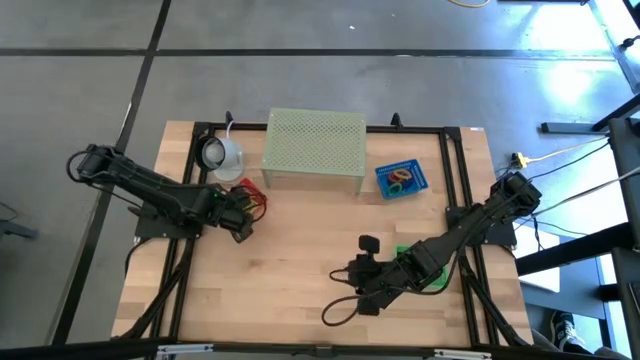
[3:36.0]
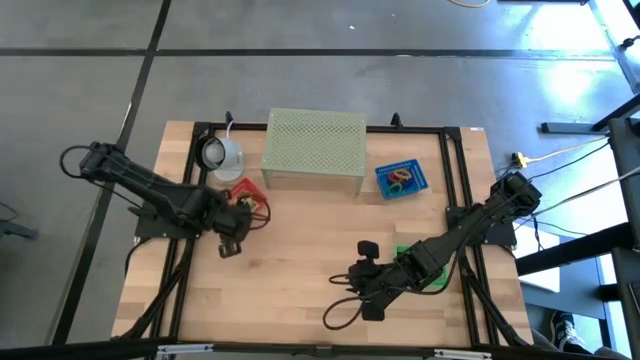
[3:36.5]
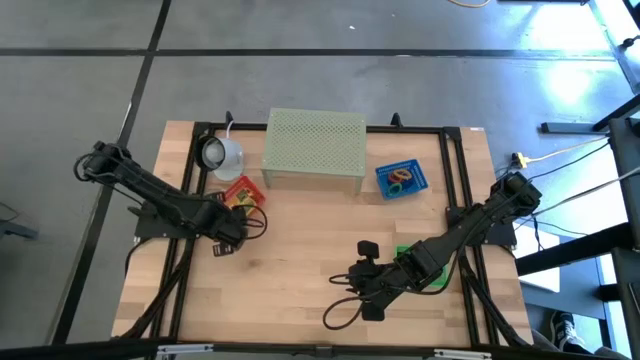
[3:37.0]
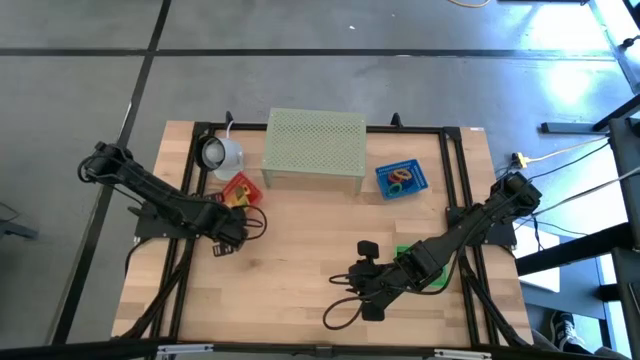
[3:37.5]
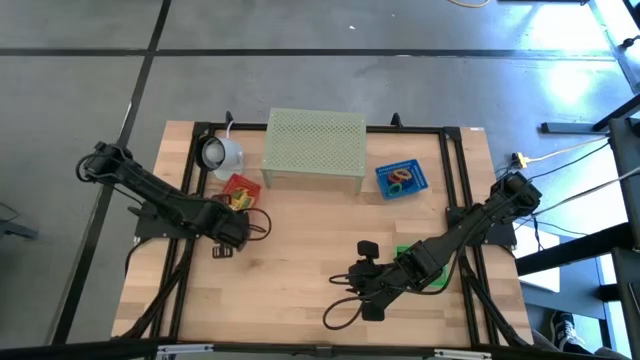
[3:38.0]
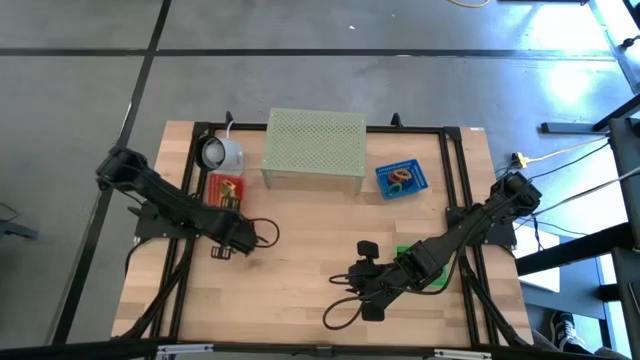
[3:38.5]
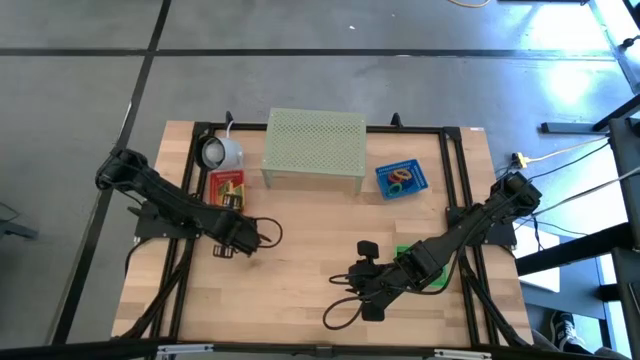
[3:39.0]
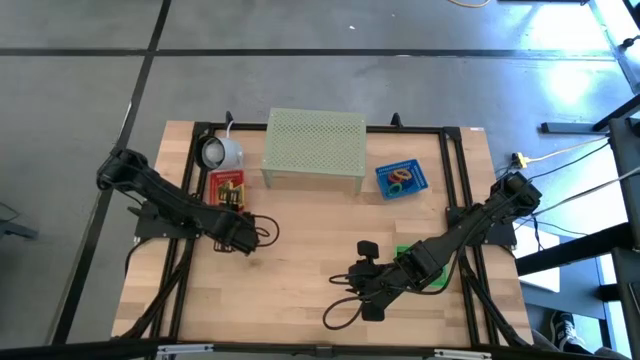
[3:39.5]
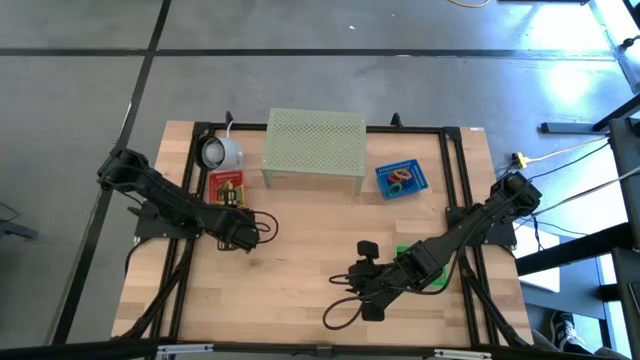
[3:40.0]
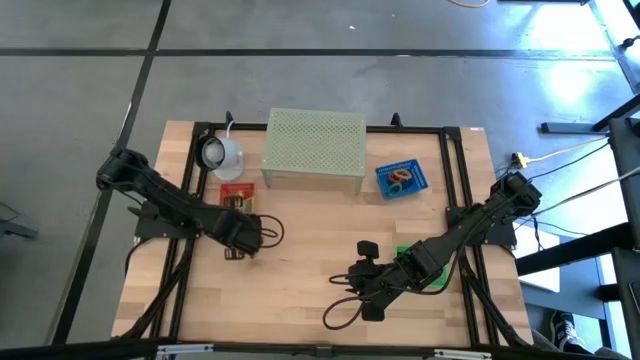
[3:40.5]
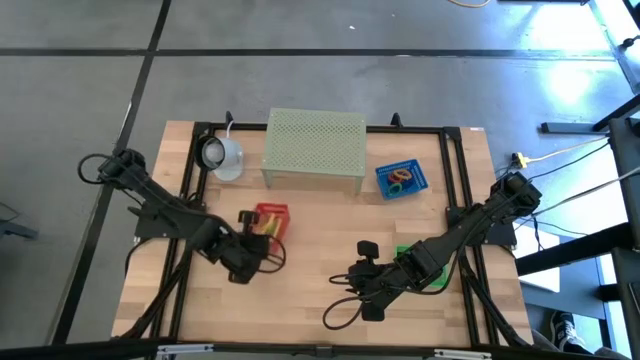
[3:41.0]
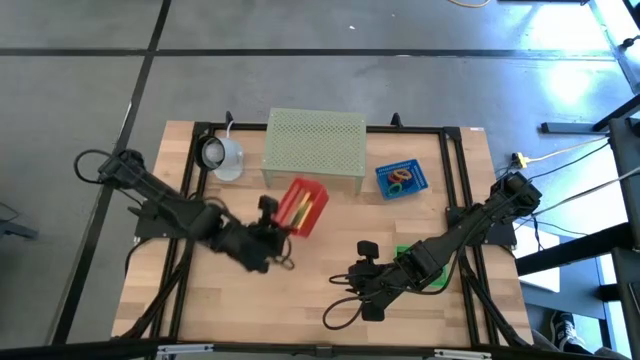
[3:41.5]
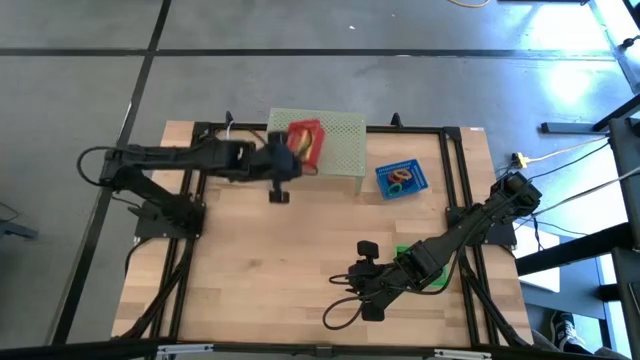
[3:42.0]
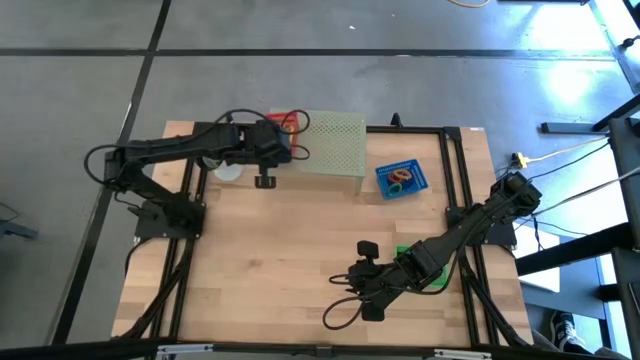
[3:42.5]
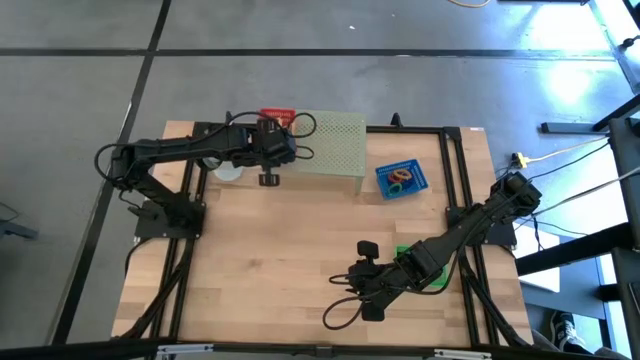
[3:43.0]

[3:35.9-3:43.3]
Task: Pick & Place Office Desk Supplies
Put the red bin on the shelf

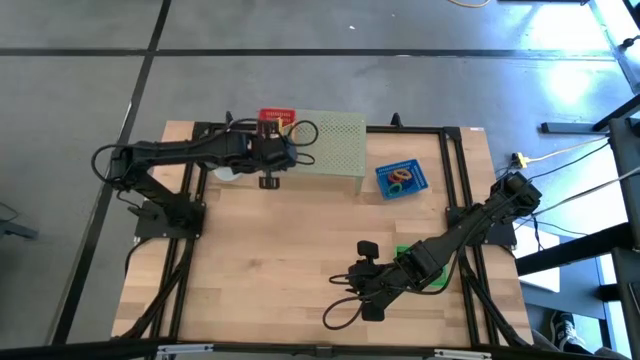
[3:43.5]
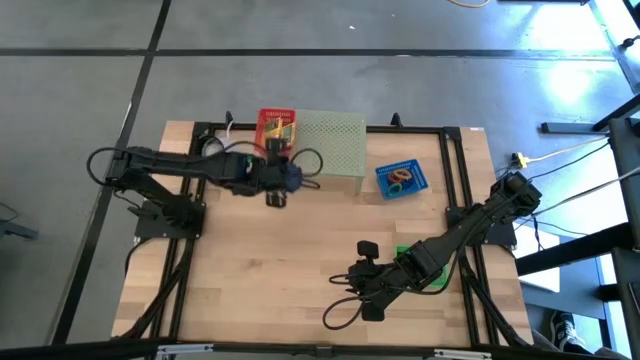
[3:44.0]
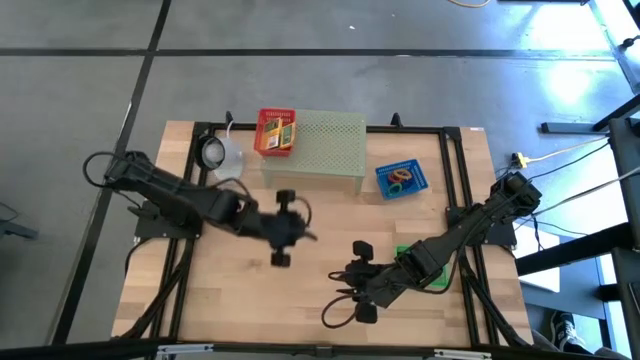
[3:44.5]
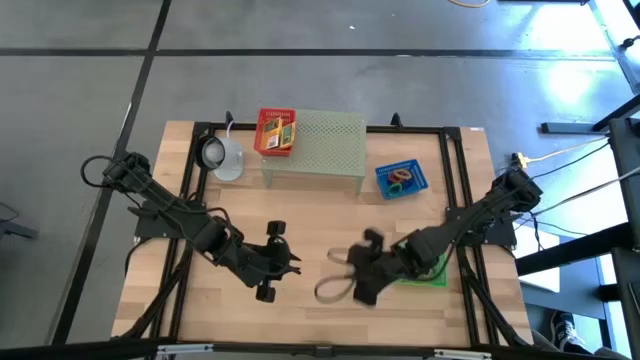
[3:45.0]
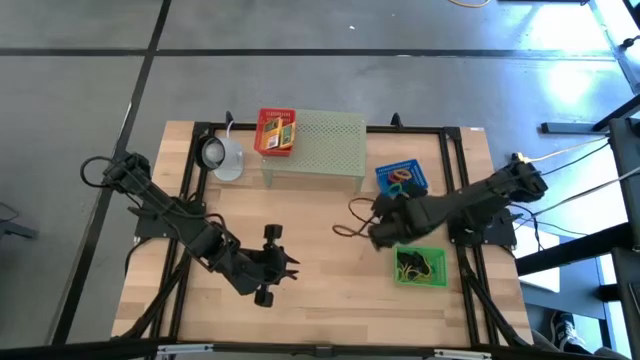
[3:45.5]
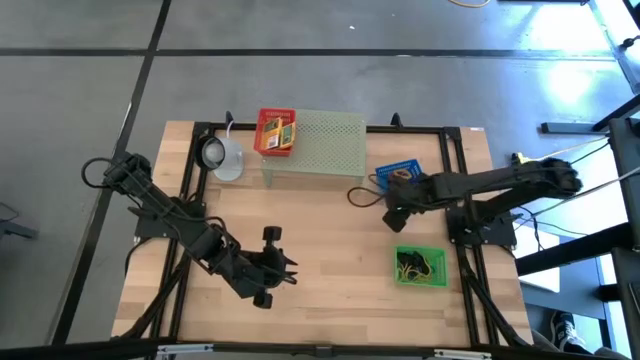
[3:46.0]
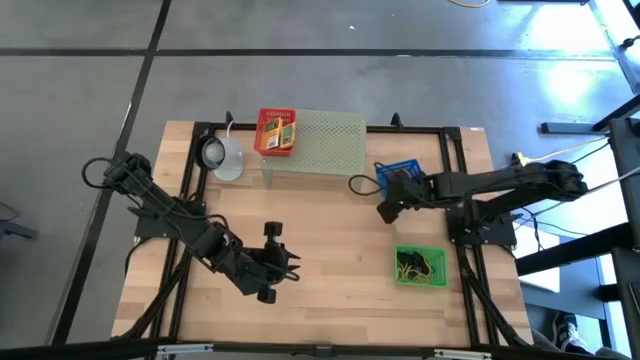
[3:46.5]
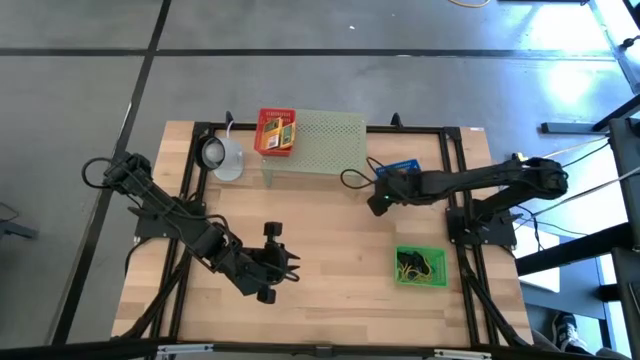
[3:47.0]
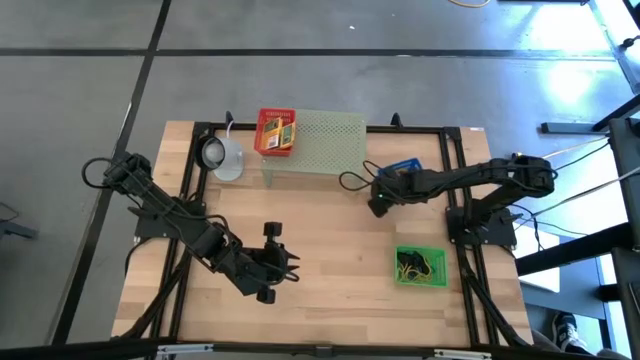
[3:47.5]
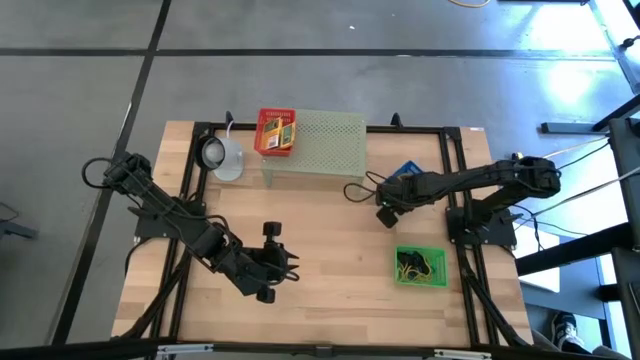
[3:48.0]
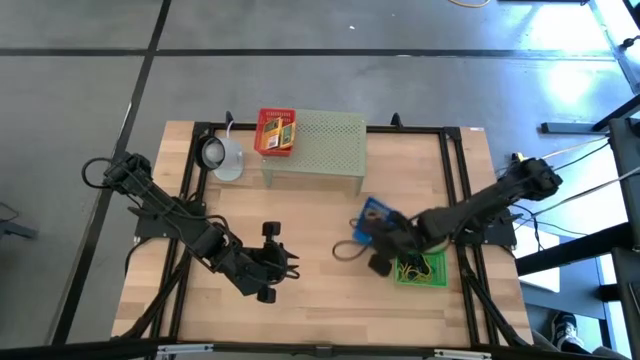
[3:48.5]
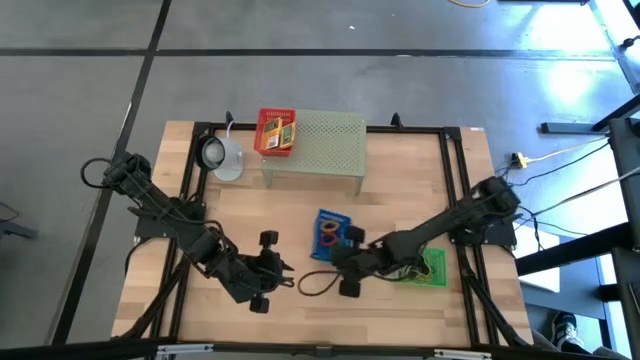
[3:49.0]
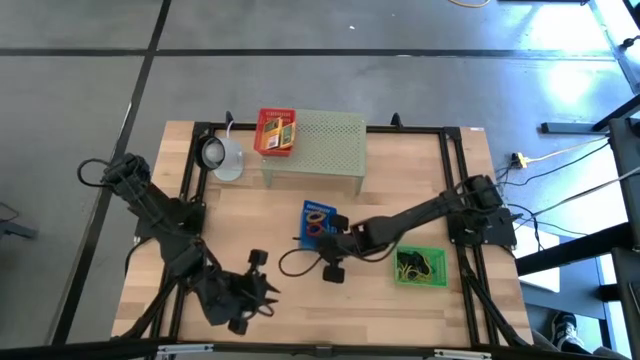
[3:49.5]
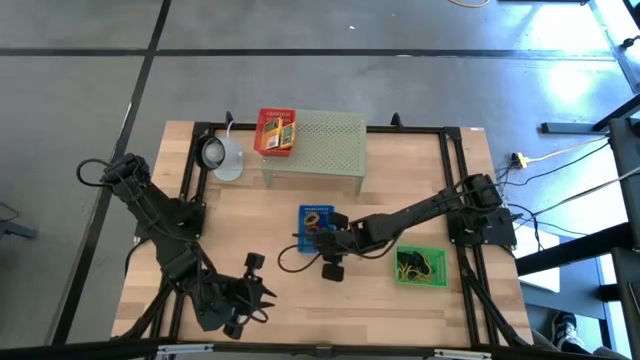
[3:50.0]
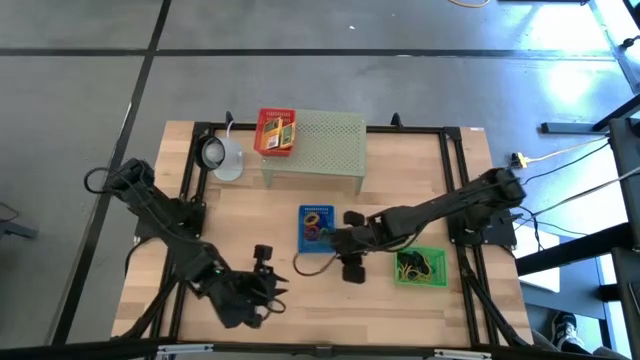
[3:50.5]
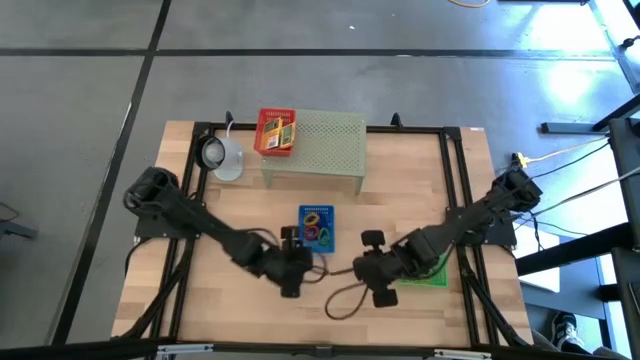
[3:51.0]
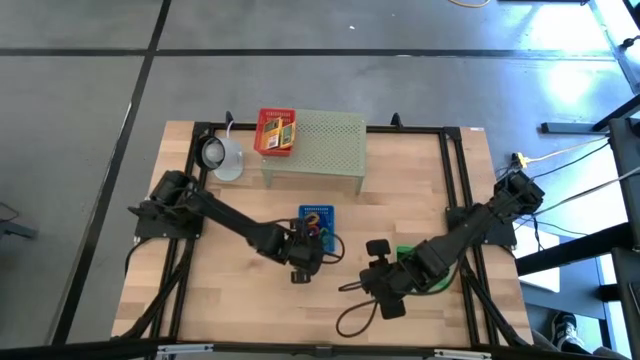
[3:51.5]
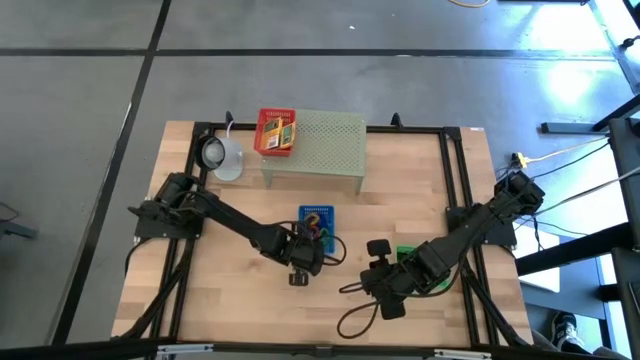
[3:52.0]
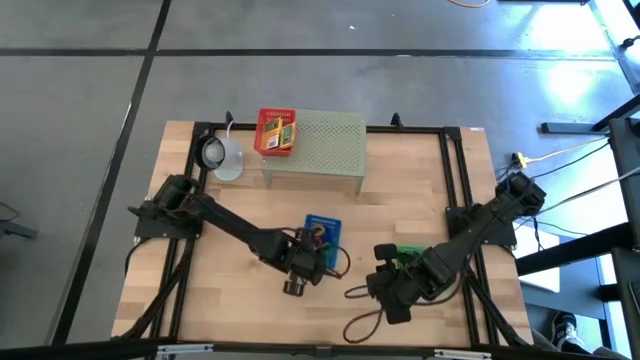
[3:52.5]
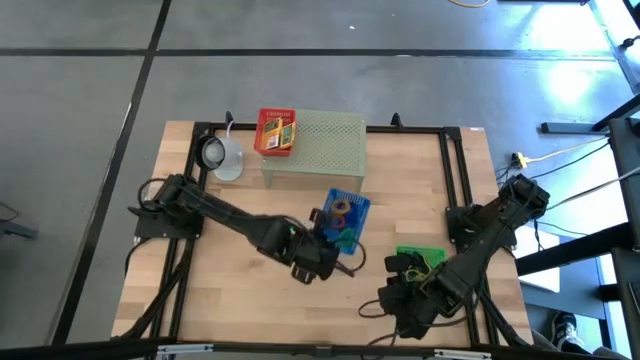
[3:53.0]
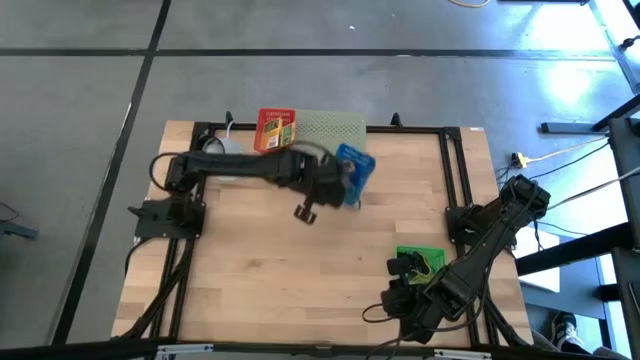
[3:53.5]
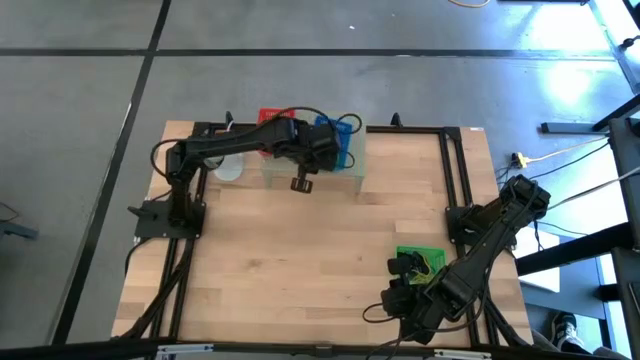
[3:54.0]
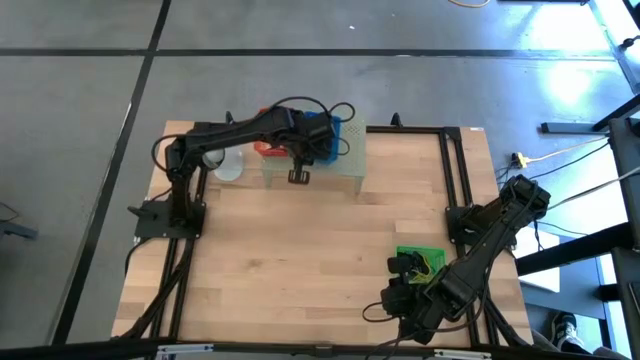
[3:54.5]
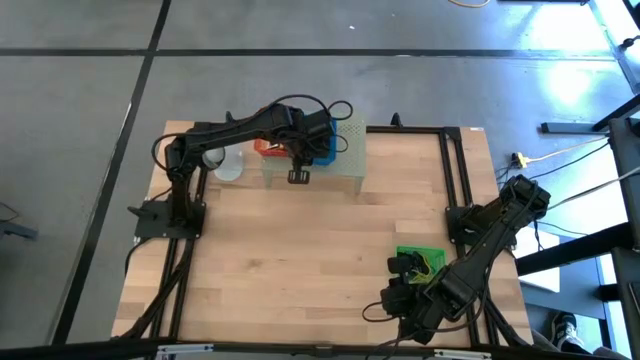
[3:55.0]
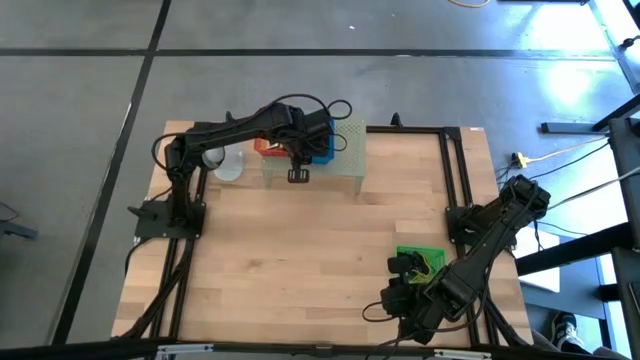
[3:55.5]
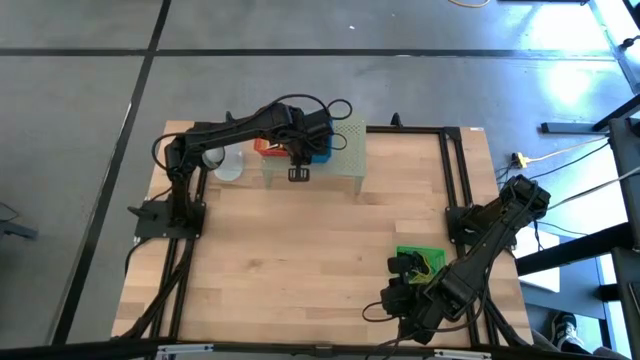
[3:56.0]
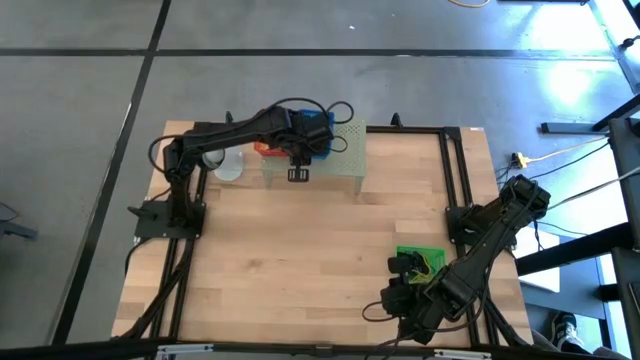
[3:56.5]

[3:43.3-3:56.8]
Put the blue bin on the shelf
